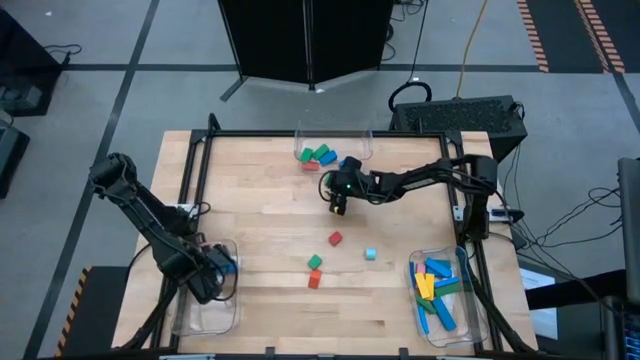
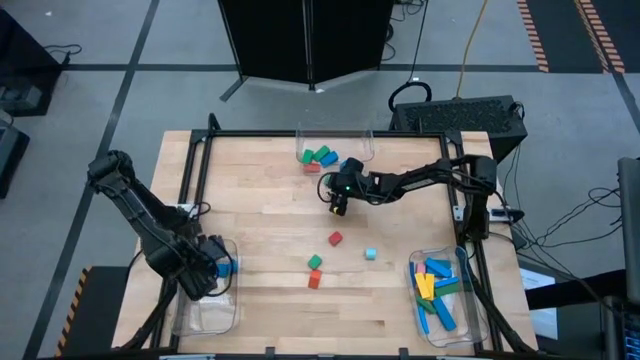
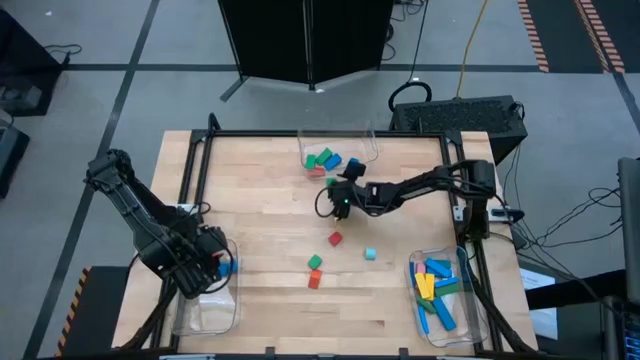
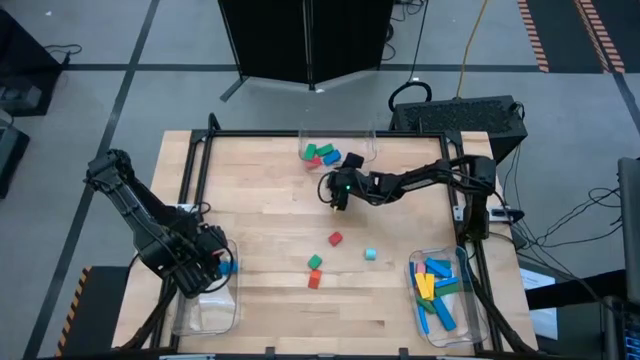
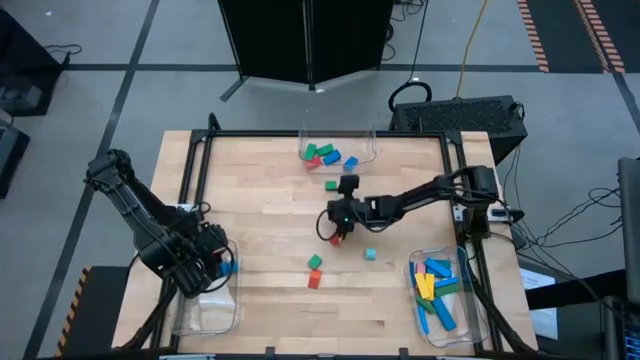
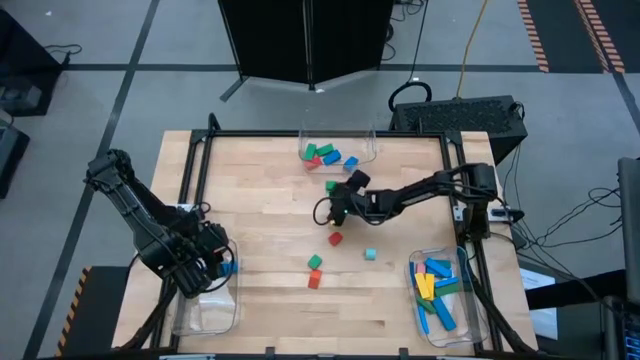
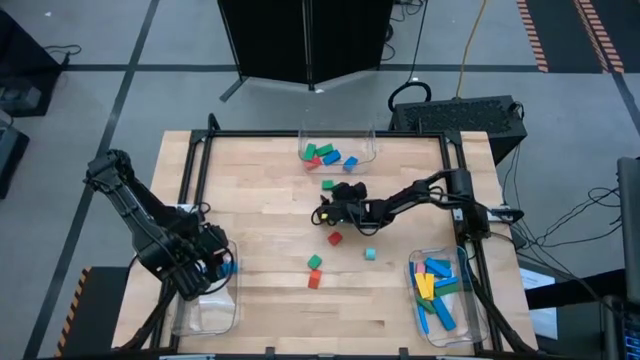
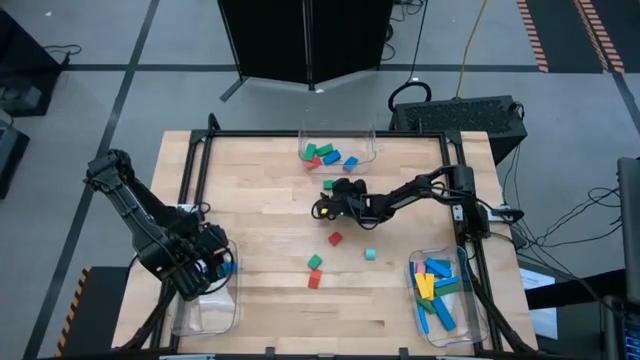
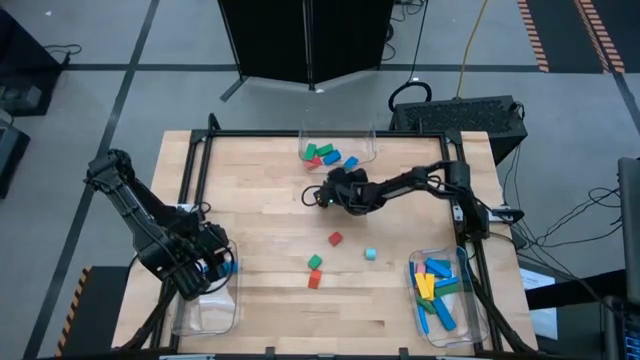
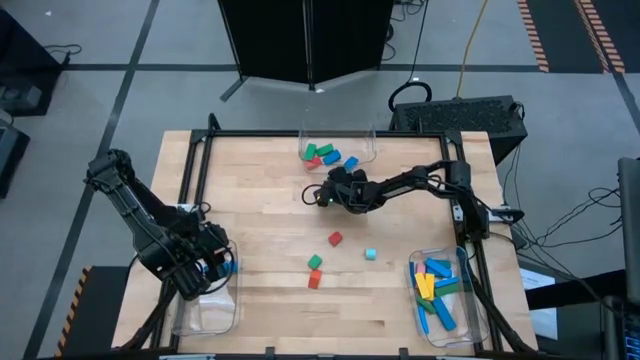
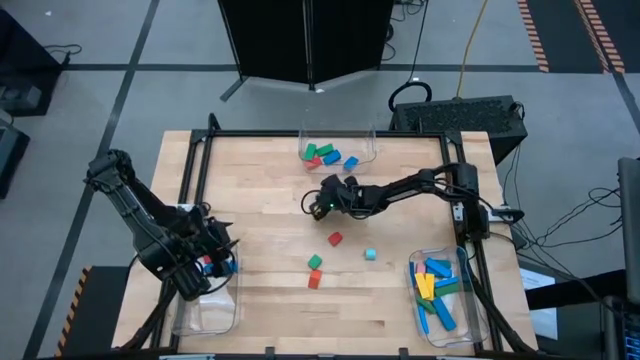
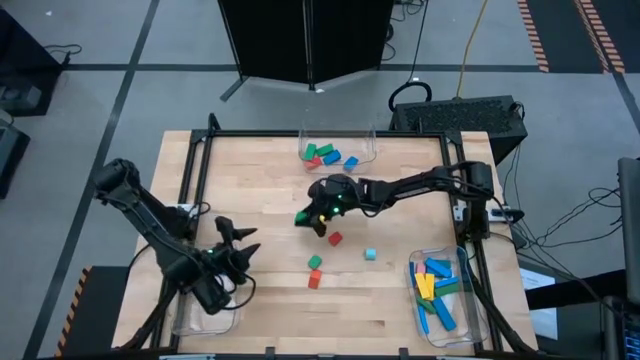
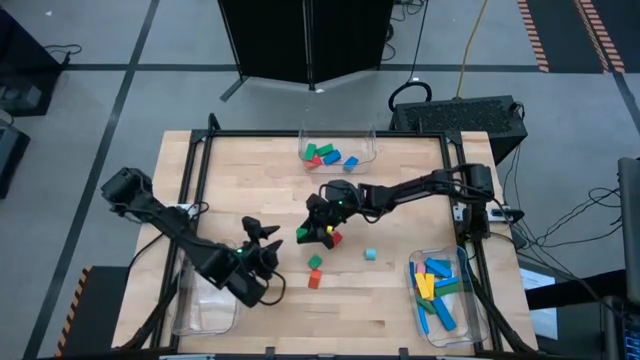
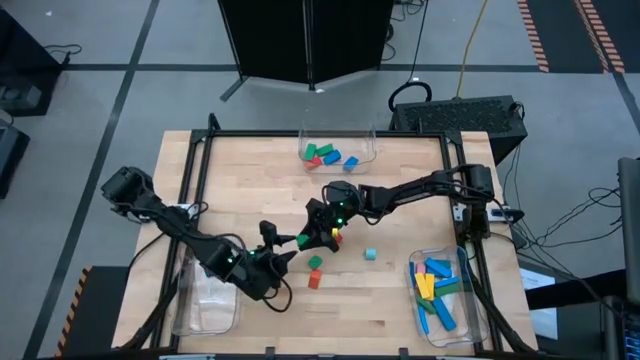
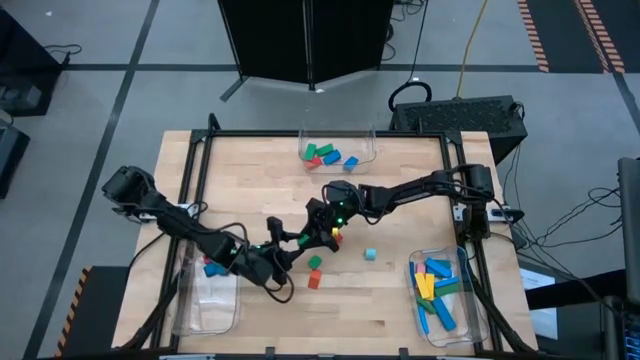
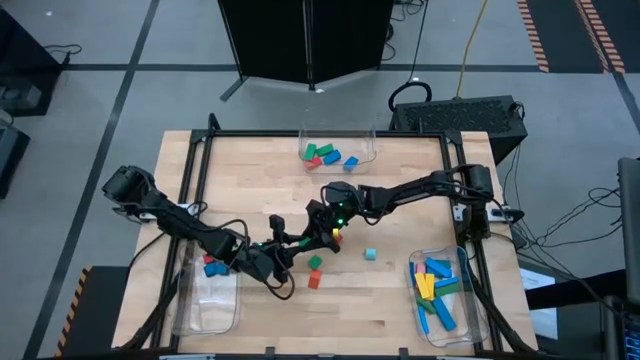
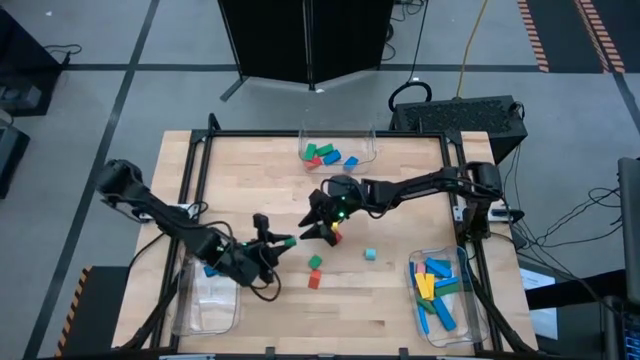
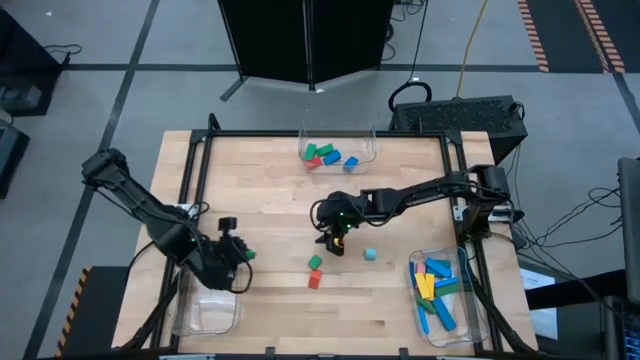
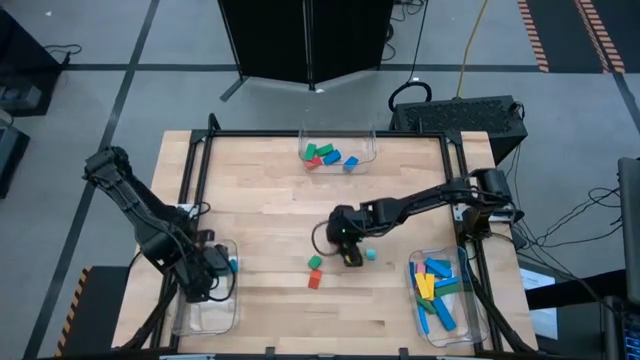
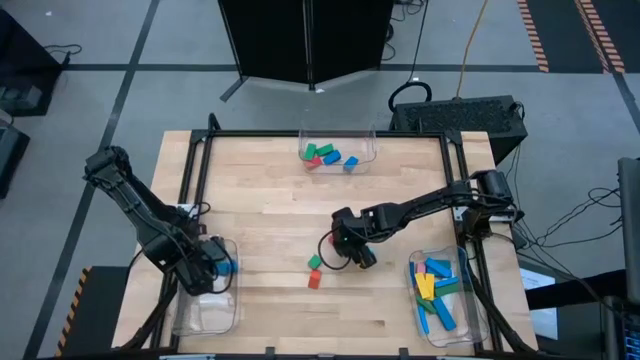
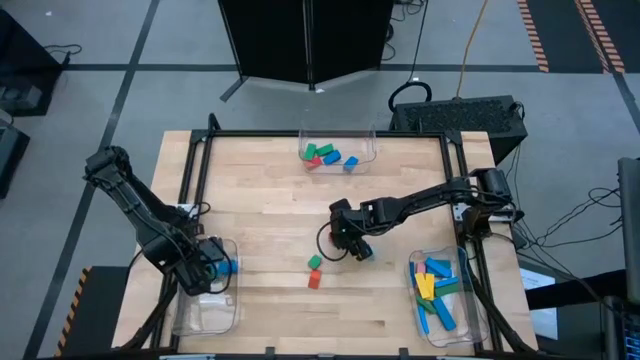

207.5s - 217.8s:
Task: Sort blocks by size
Put the green half circle block into the bottom left transparent bin

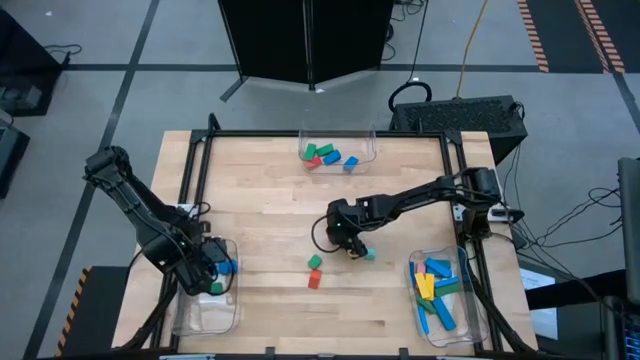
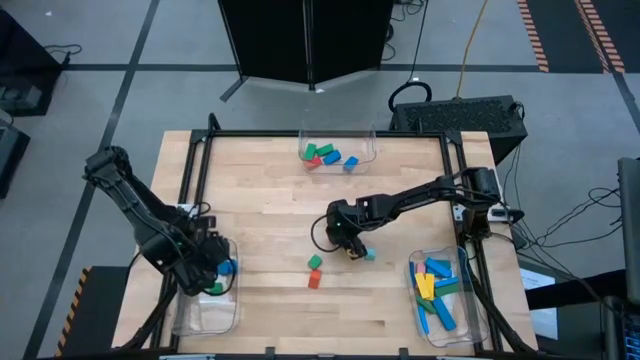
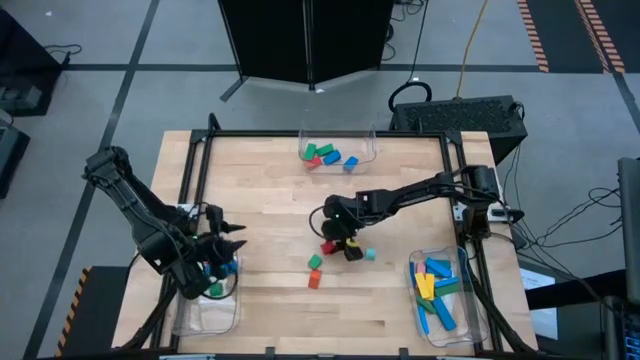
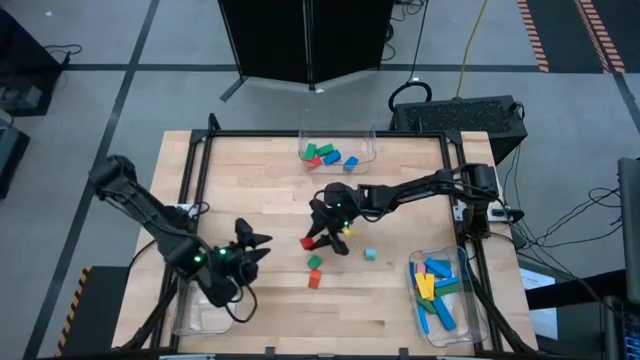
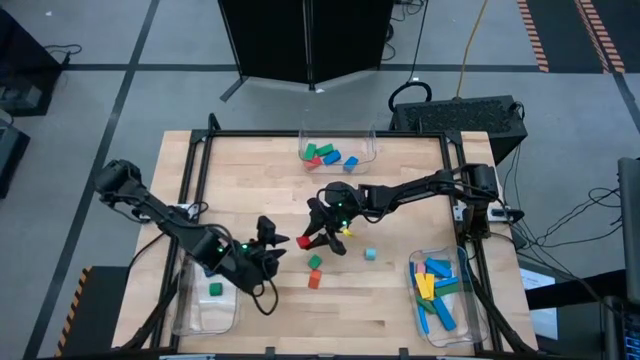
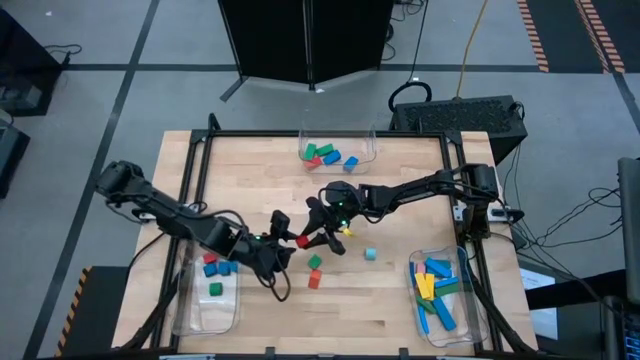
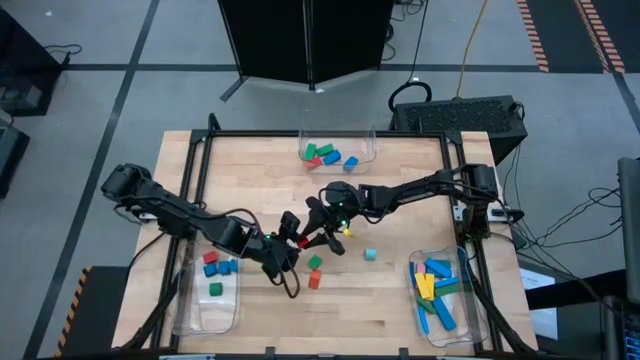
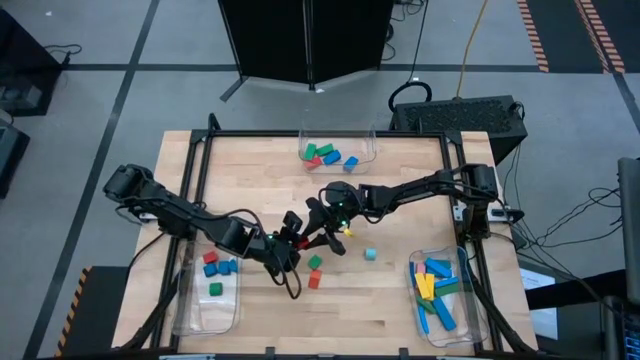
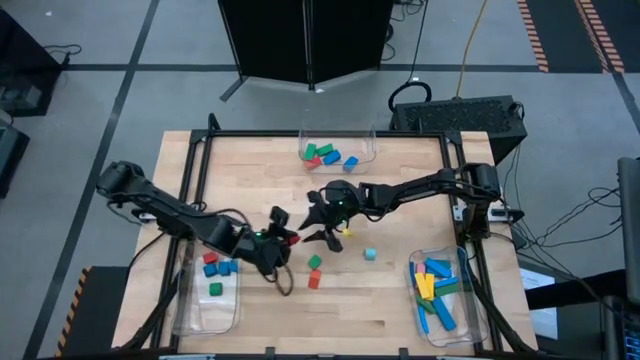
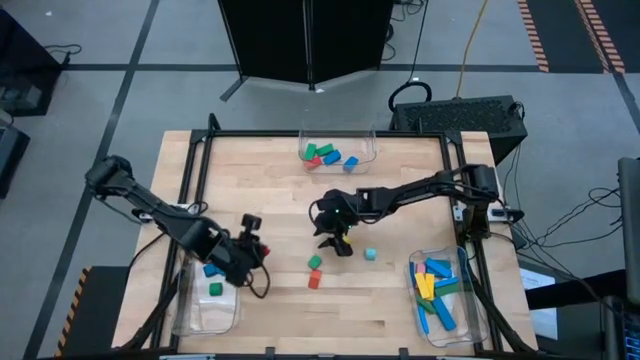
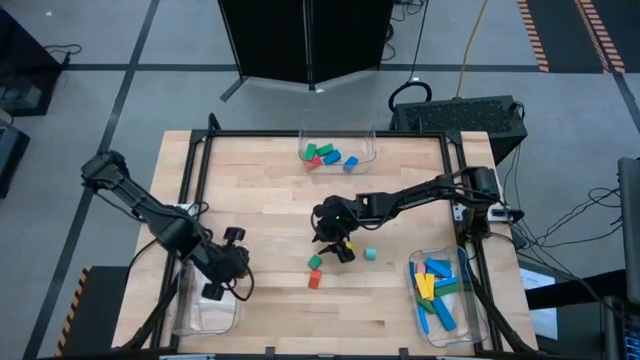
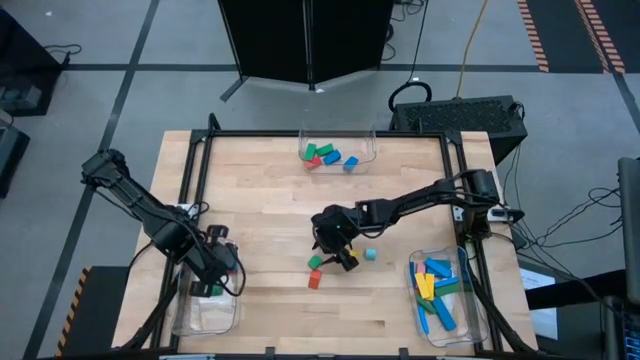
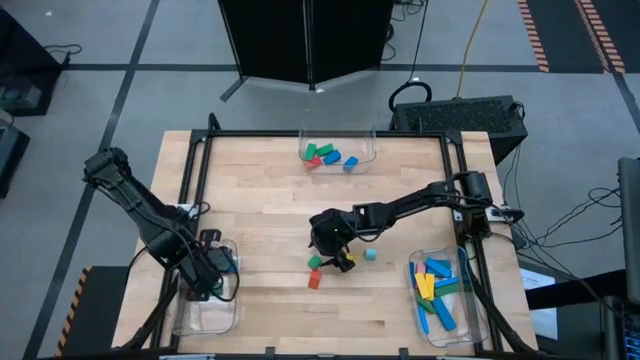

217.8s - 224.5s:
Put the red half circle block into the bottom left transparent bin

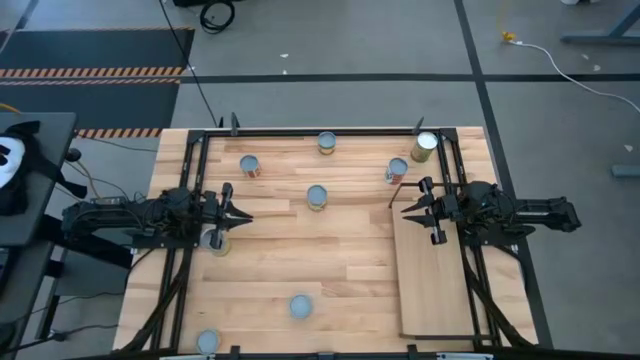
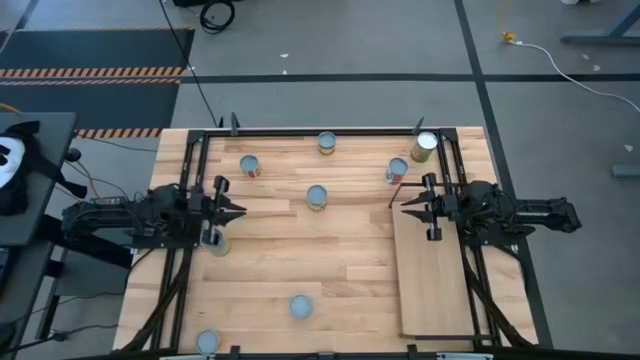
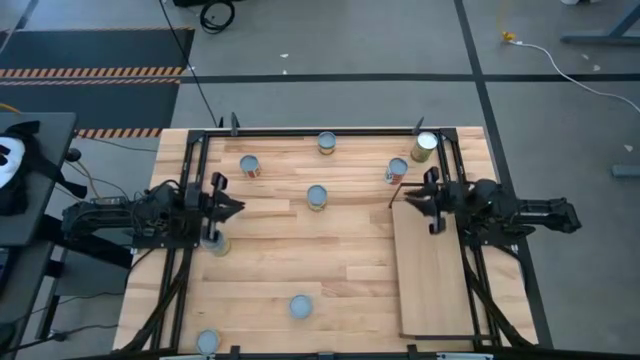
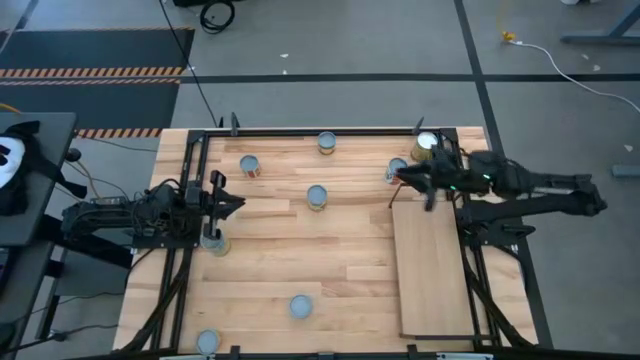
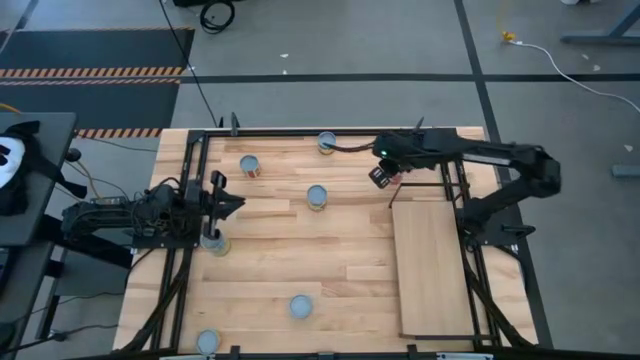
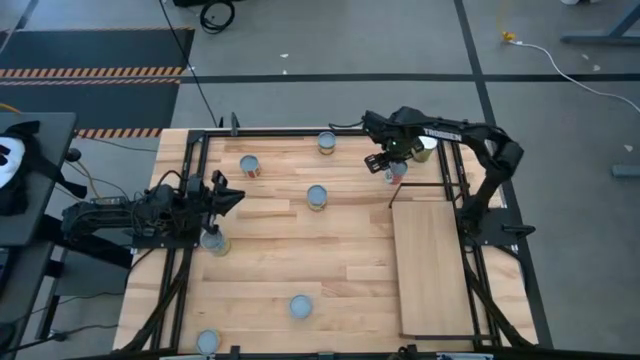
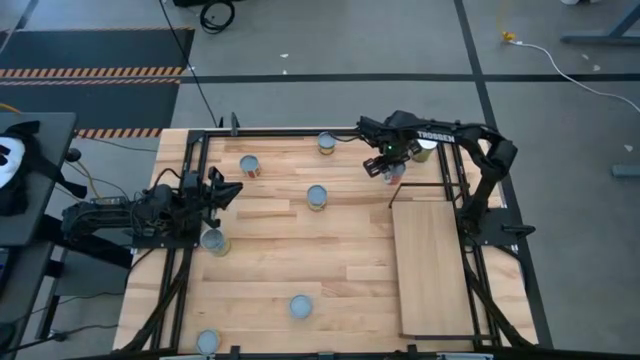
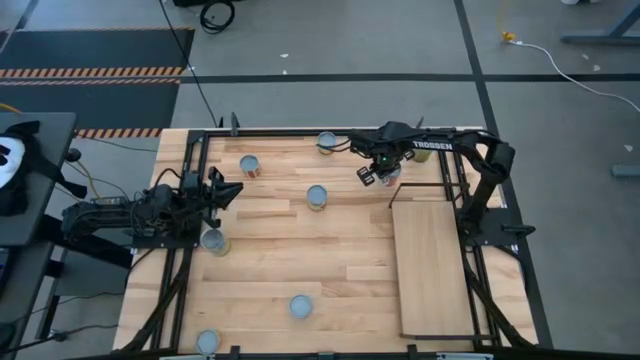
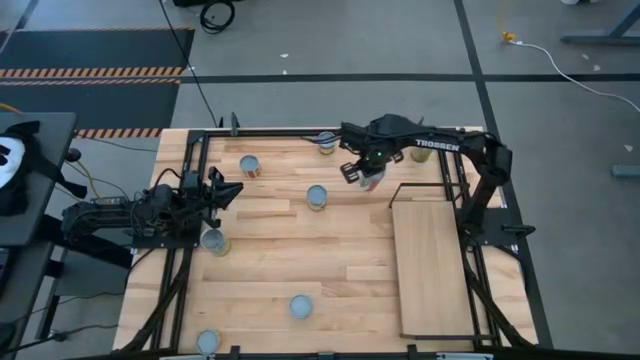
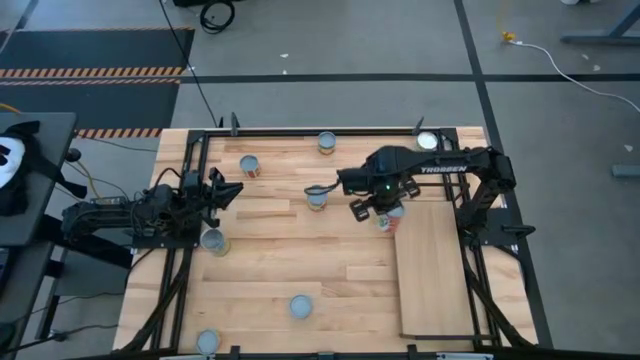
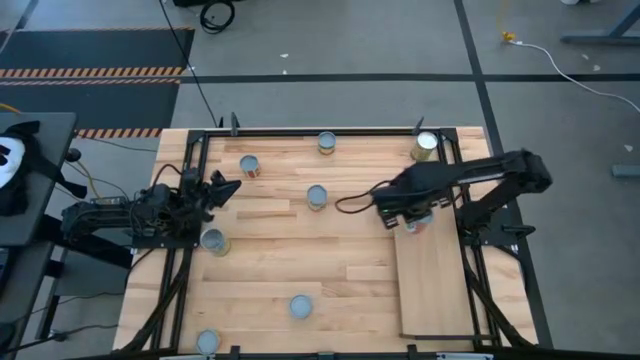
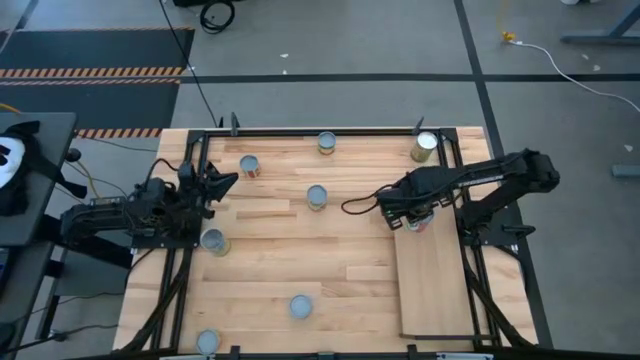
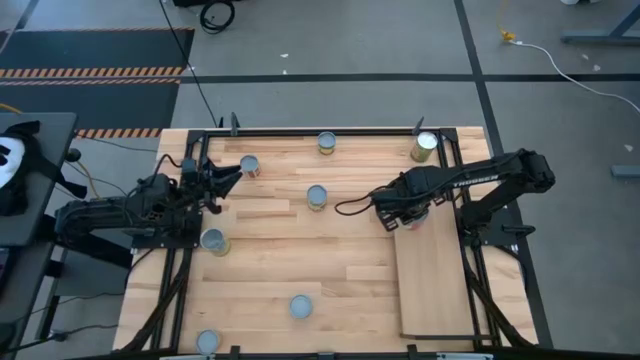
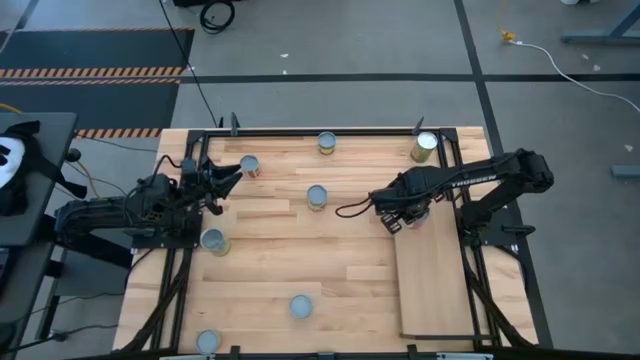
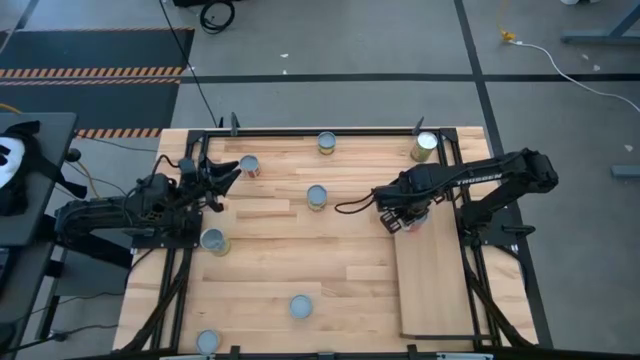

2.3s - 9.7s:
Task: Pick and place cans onto a shelf
Put the canned mixed fruit on the shelf
